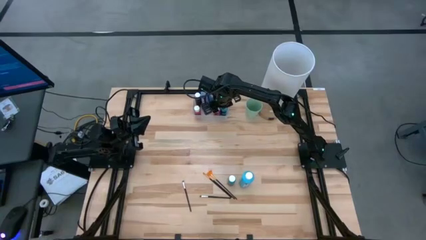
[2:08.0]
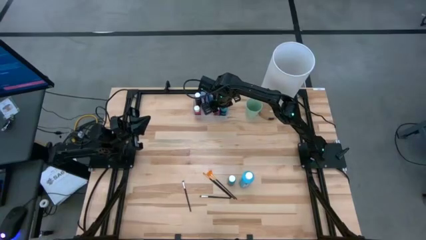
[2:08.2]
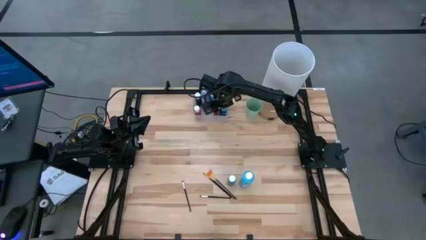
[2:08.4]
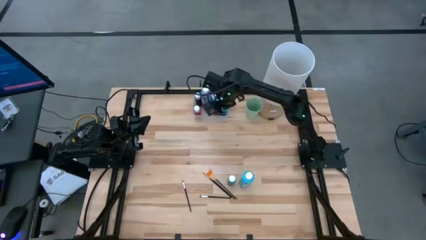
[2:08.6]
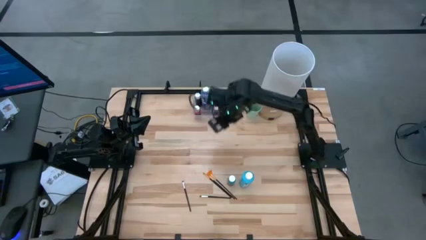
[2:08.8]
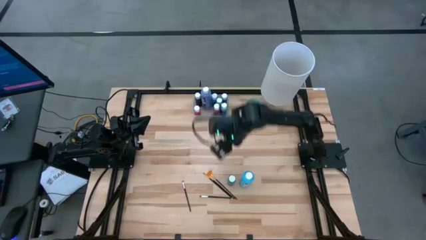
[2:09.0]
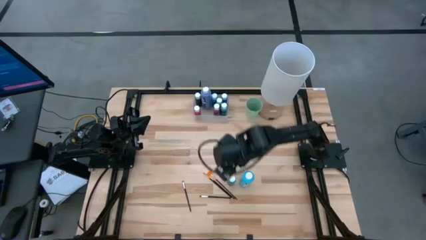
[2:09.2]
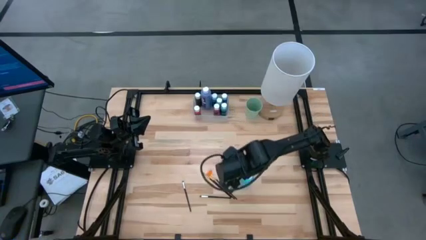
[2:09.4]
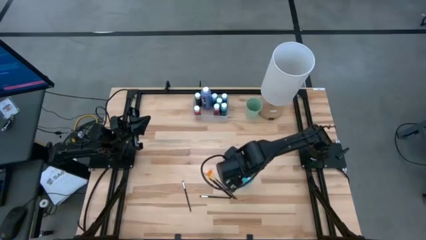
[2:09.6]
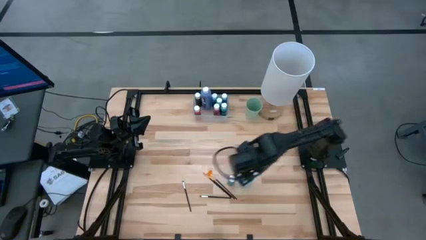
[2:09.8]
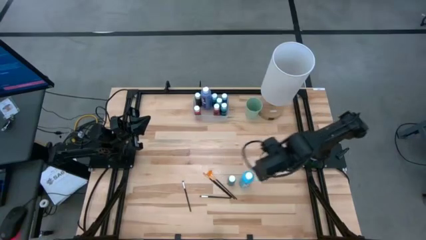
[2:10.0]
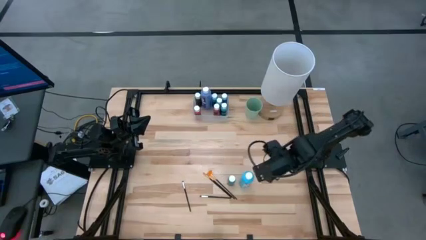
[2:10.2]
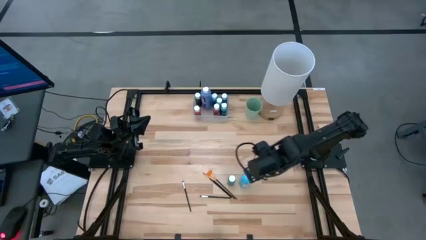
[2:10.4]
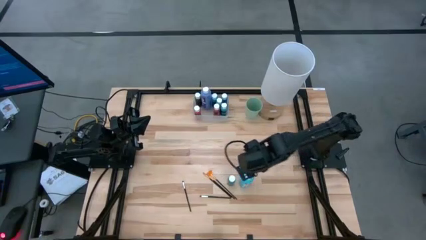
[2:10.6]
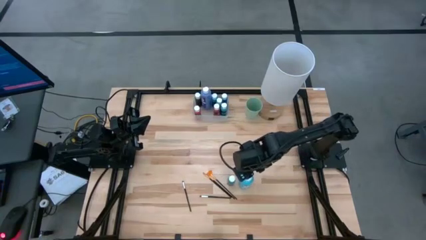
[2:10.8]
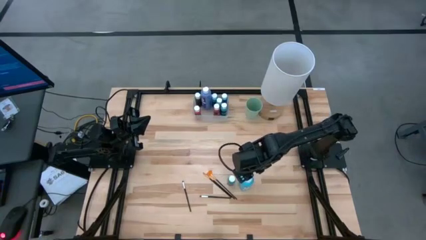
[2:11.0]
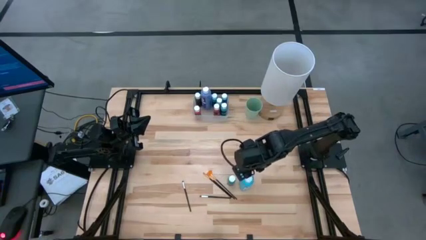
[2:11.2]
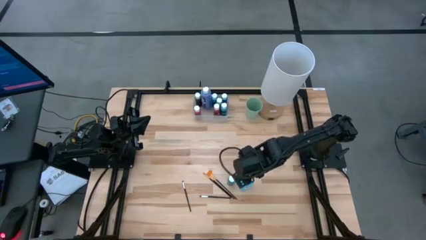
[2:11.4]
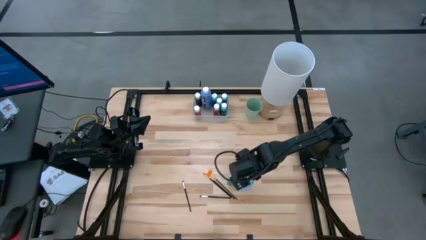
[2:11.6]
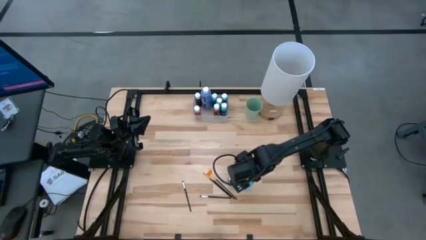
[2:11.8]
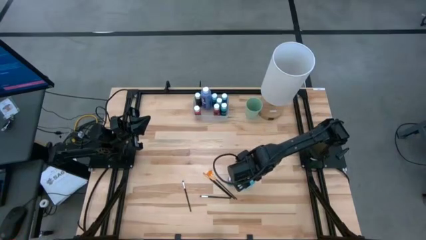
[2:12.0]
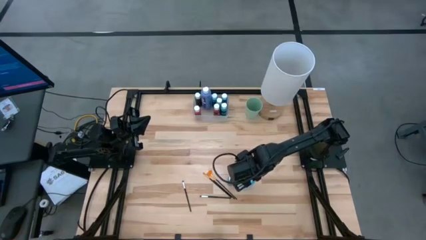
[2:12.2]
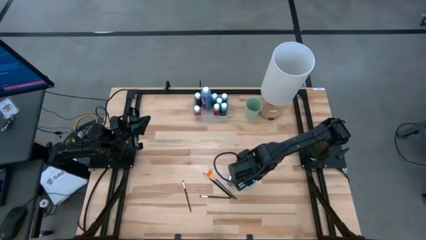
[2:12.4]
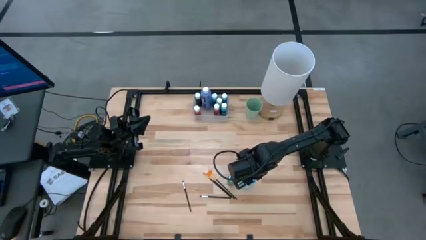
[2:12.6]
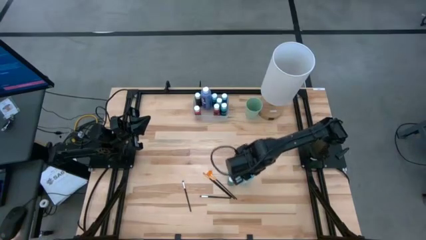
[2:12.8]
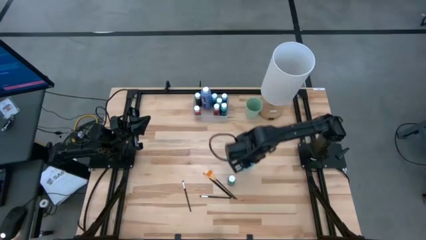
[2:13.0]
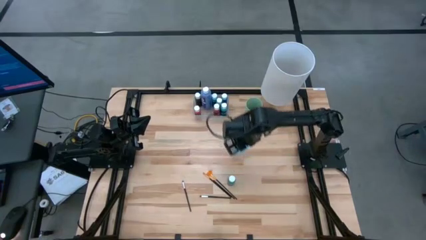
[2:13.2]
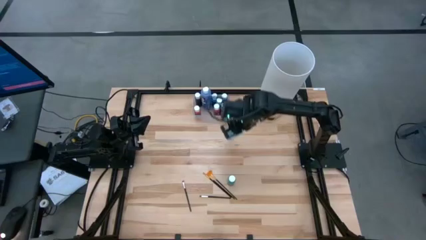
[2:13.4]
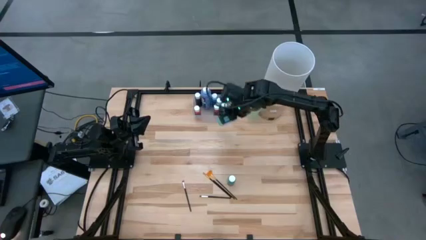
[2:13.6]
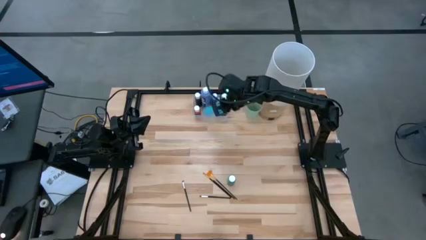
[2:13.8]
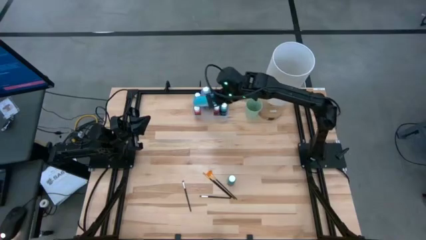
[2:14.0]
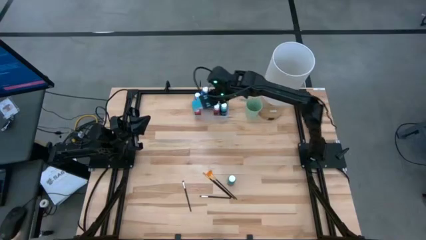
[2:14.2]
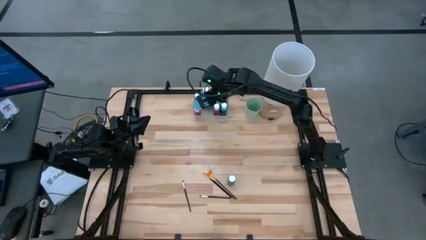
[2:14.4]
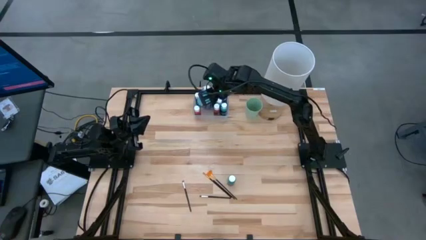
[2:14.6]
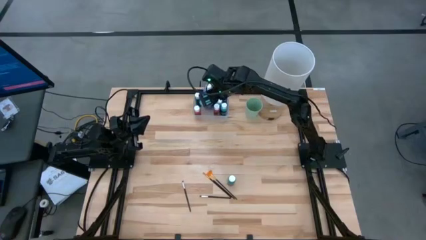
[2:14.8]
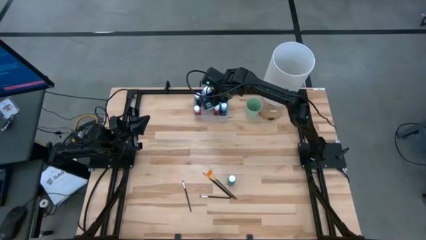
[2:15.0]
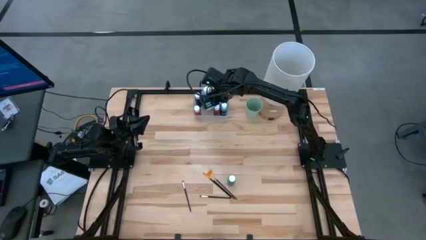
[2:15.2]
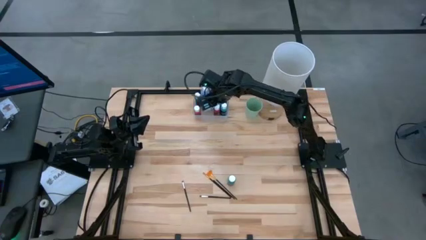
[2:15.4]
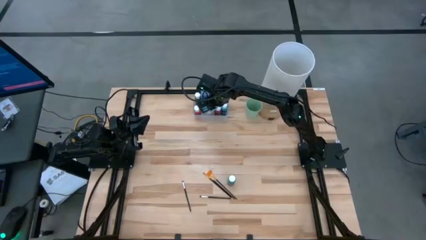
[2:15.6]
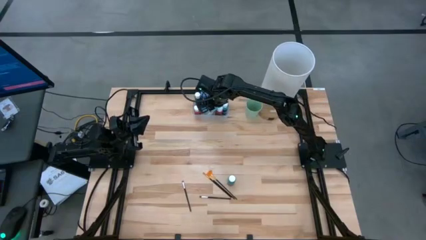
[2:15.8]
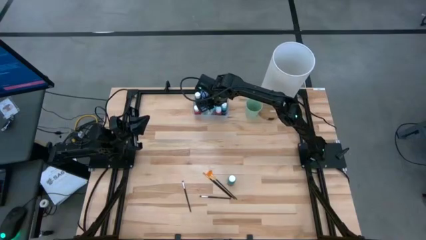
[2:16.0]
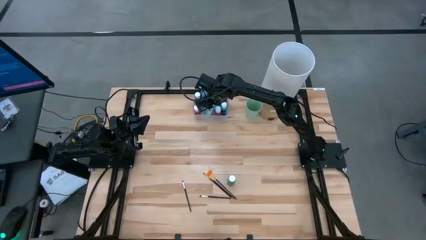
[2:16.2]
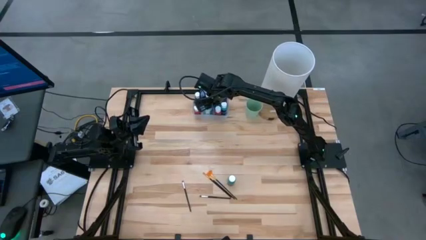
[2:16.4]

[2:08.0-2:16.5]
Task: Pick & Place Paint Supplies
Put the large light blue paint bottle into the transparent bin

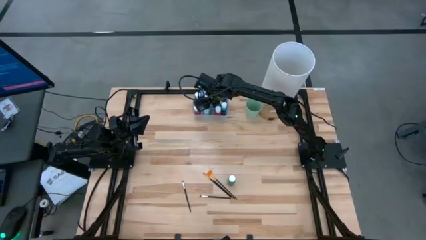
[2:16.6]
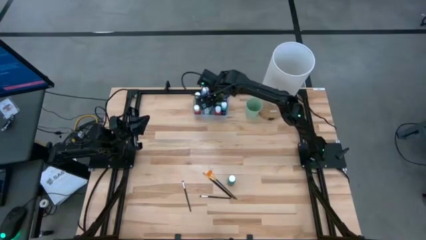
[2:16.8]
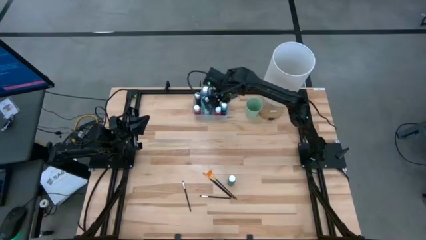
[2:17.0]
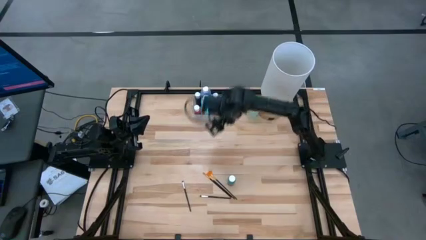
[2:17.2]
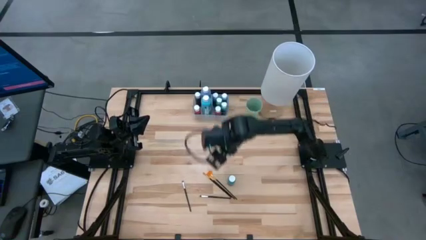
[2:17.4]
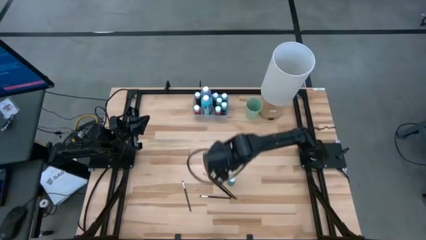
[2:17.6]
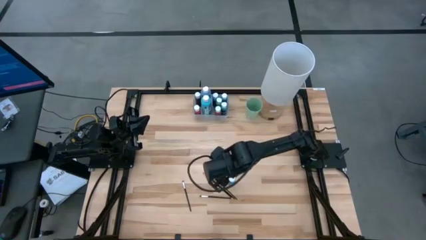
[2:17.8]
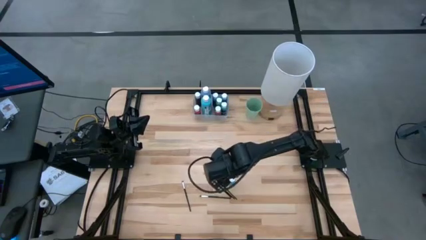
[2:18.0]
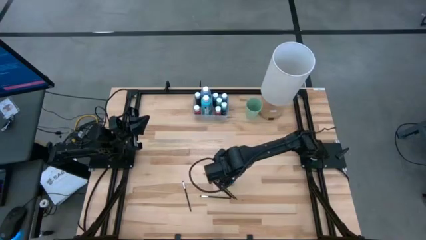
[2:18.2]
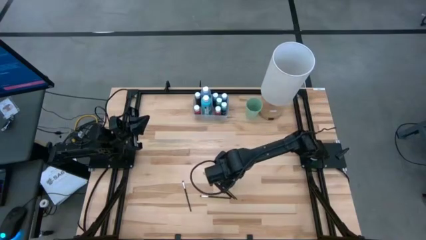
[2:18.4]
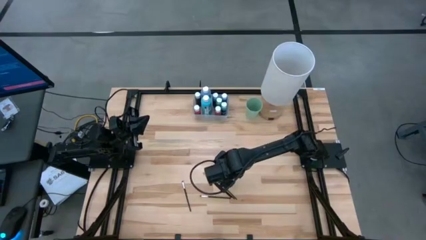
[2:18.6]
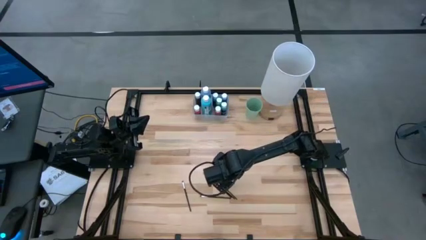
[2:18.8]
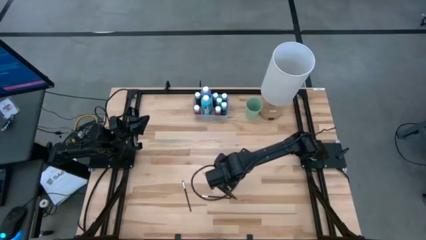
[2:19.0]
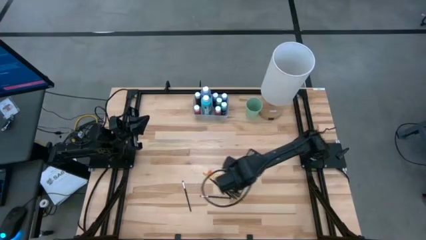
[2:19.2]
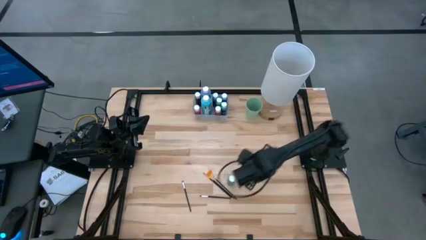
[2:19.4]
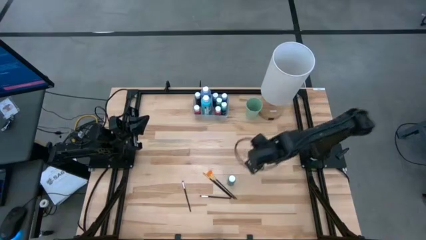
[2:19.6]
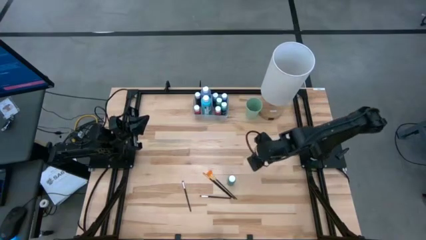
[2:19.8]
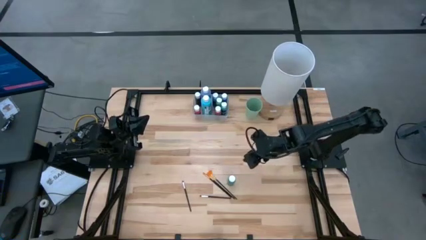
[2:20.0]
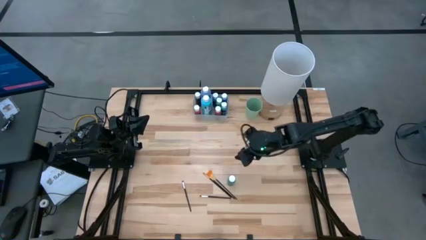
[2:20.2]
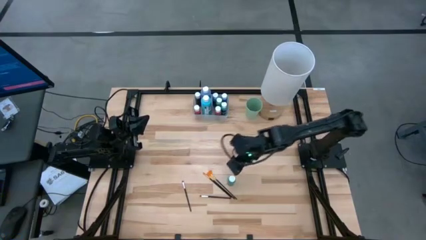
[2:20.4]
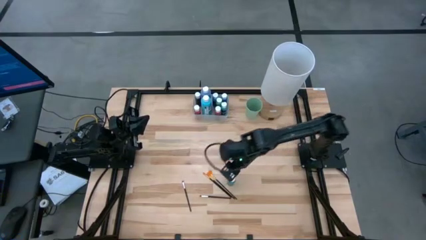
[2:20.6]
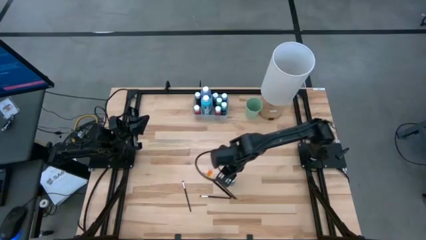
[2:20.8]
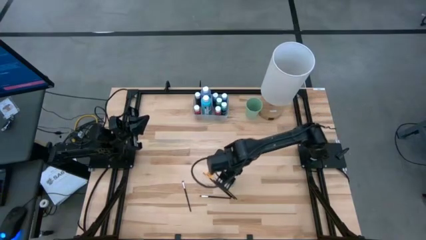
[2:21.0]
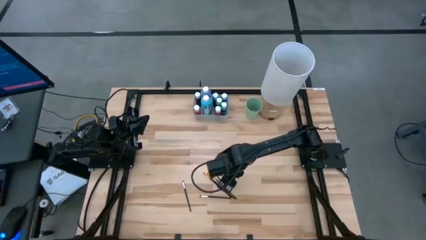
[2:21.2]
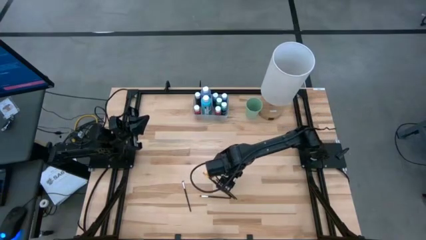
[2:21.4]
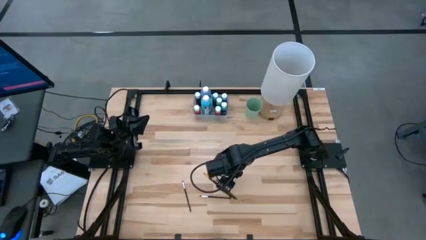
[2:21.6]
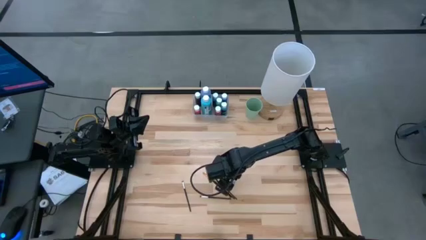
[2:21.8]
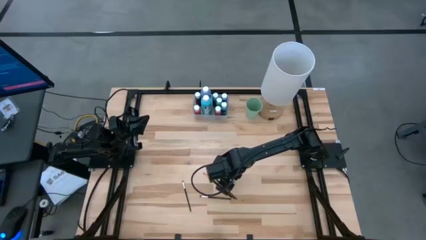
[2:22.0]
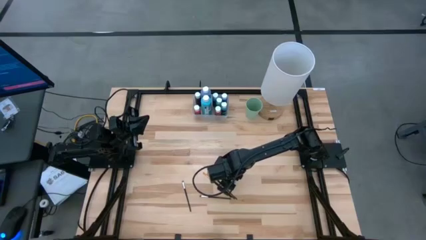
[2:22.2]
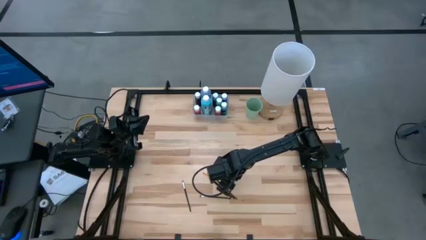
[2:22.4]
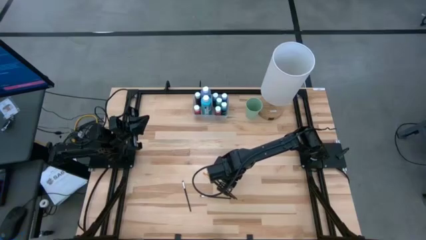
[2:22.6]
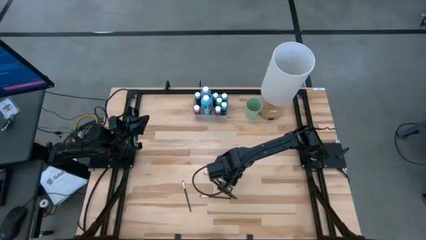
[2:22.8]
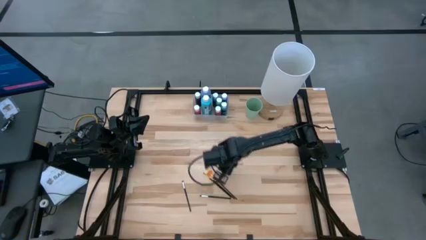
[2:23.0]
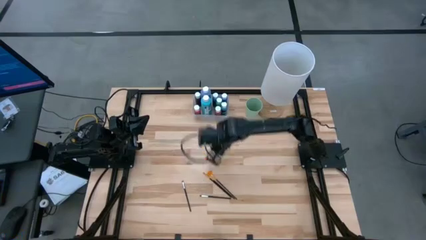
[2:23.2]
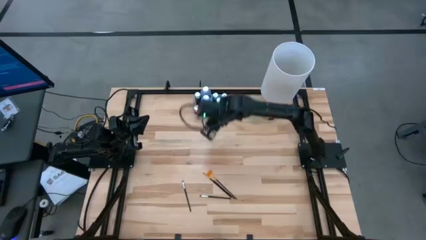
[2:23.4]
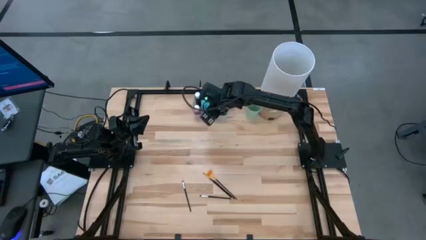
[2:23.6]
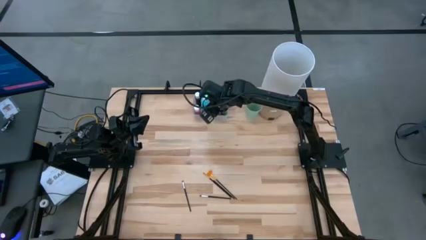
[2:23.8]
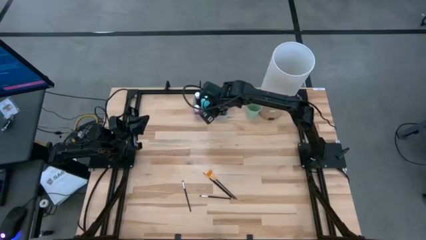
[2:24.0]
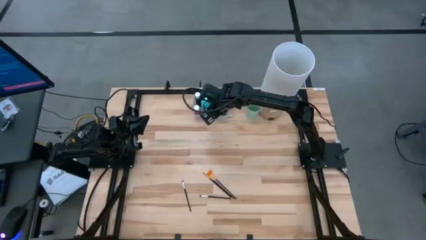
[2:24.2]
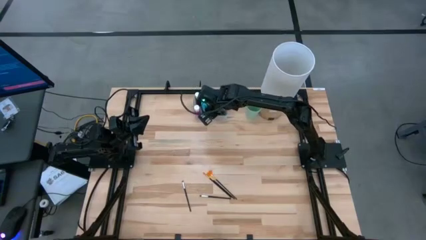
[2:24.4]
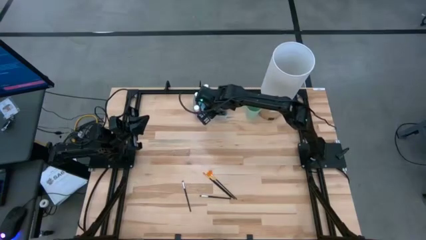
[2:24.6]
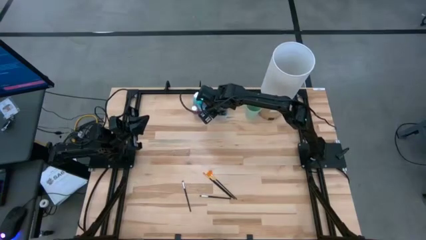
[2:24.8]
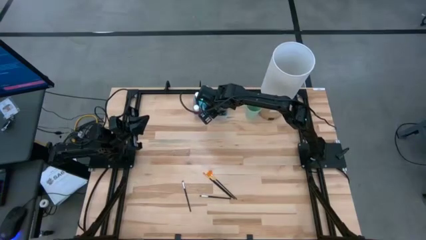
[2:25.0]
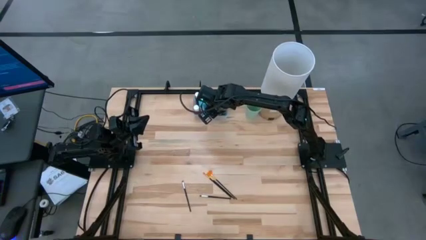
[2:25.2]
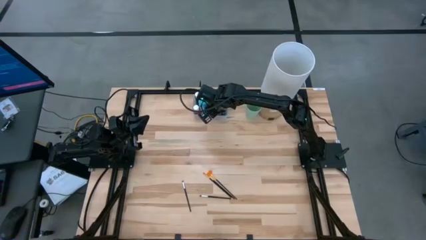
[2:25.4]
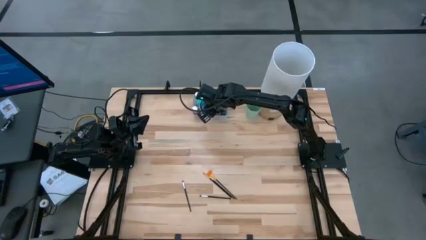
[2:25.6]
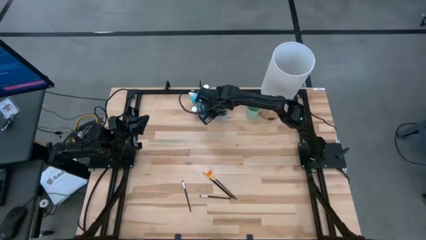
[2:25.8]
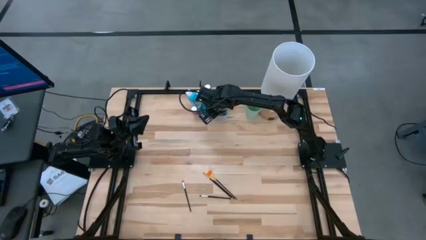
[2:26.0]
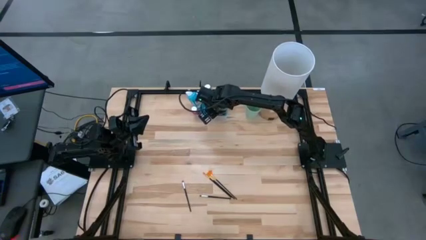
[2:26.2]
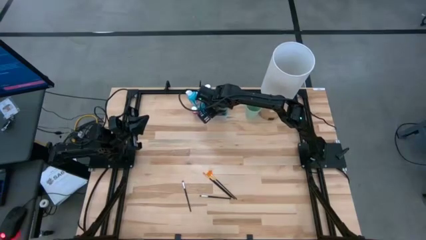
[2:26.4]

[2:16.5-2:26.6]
Put the small light blue paint bottle into the transparent bin
